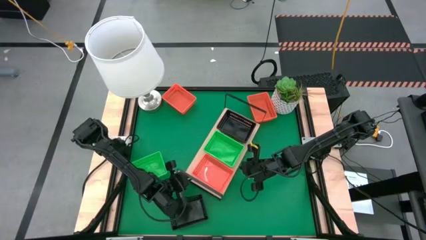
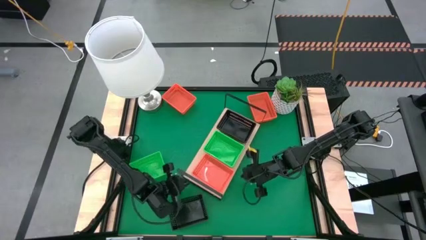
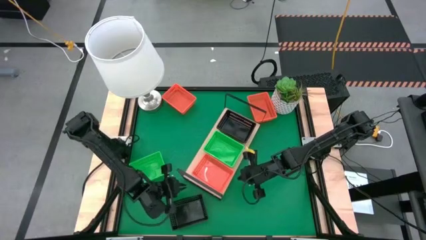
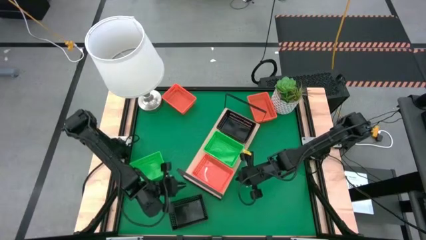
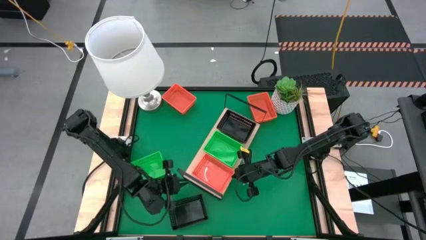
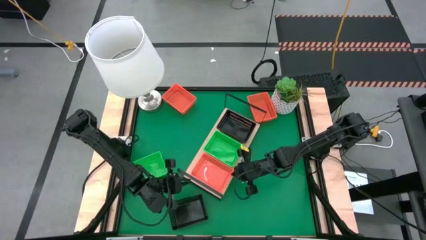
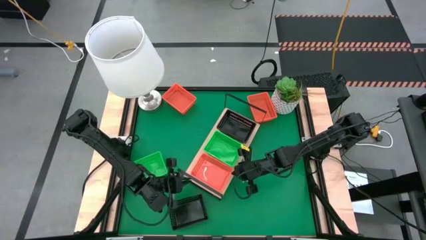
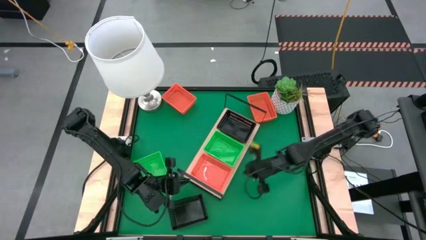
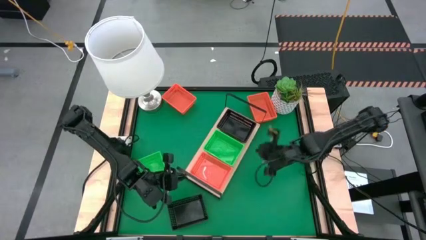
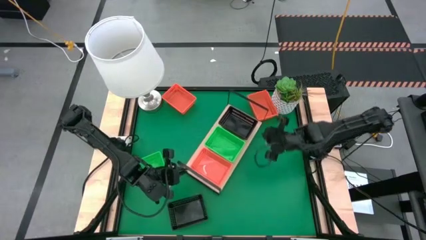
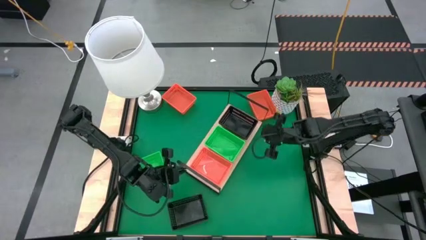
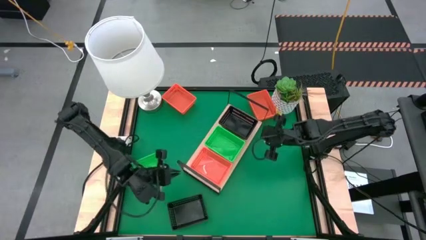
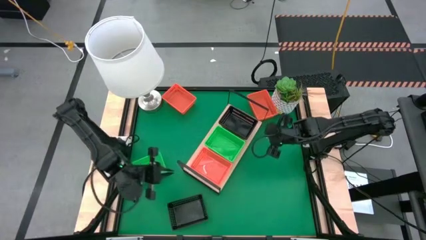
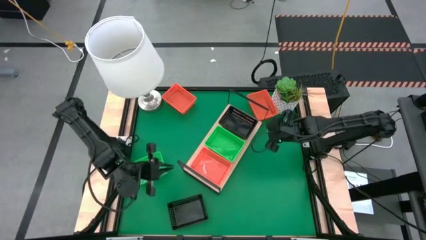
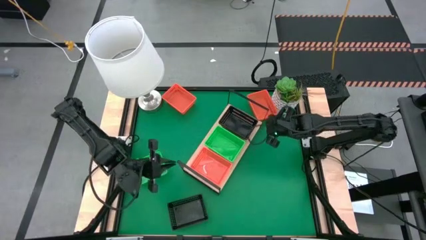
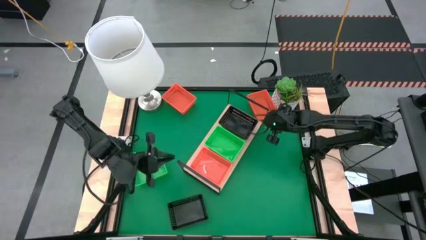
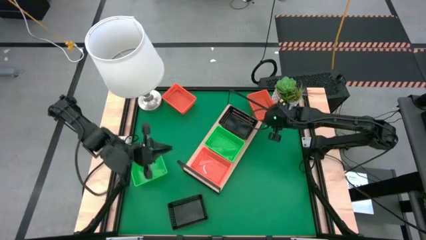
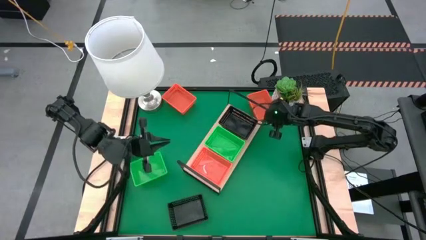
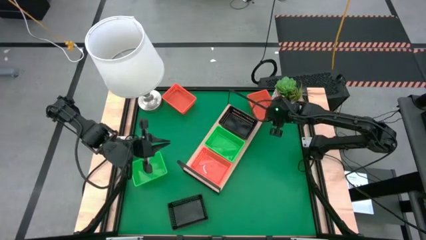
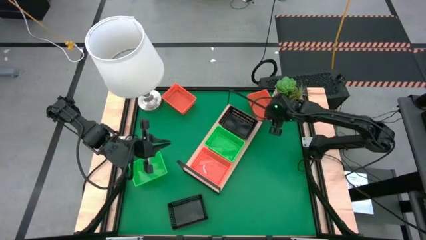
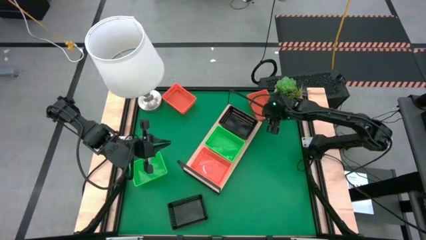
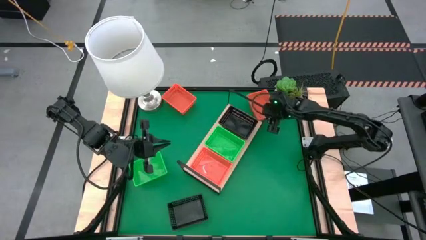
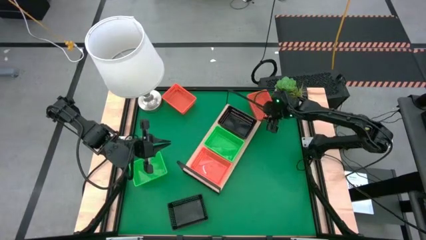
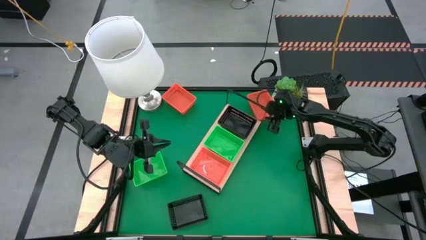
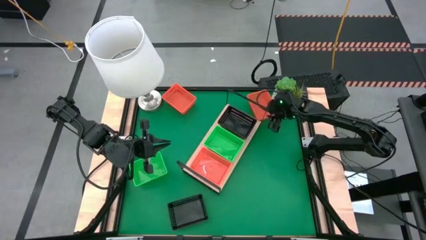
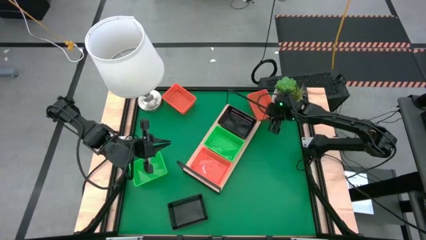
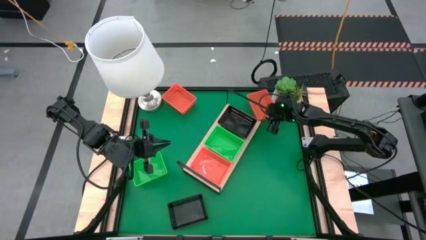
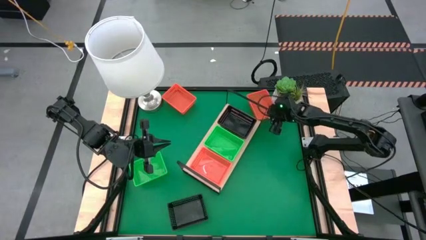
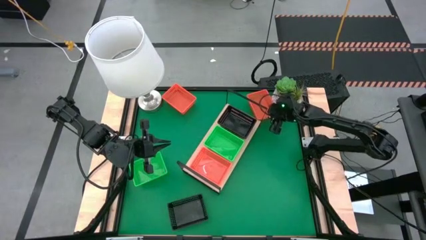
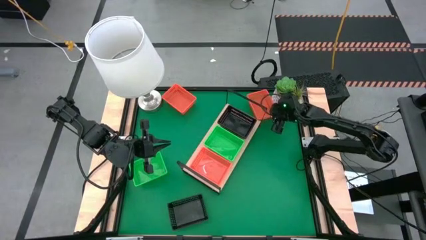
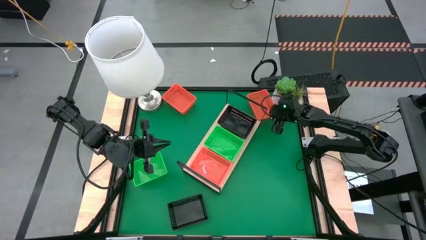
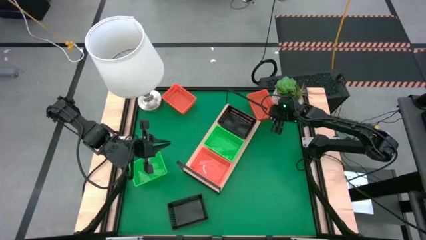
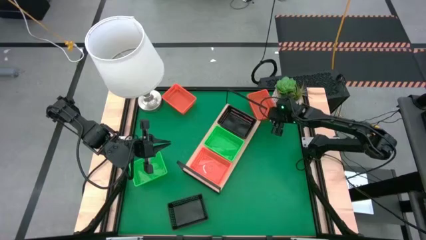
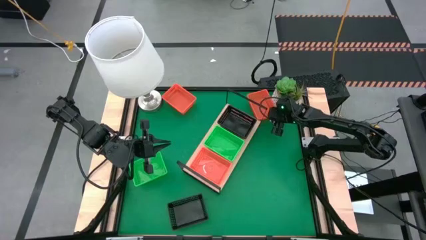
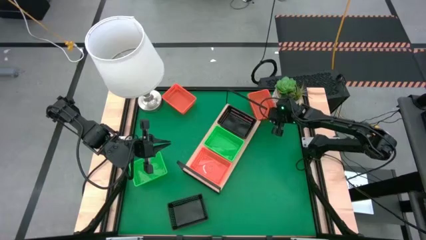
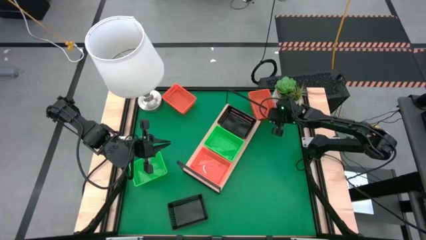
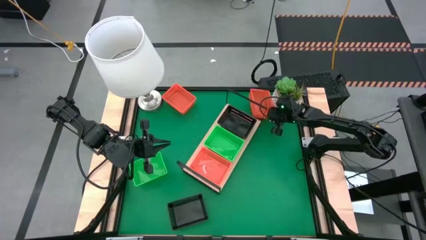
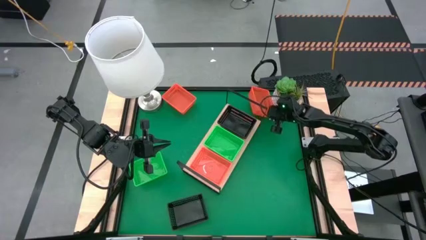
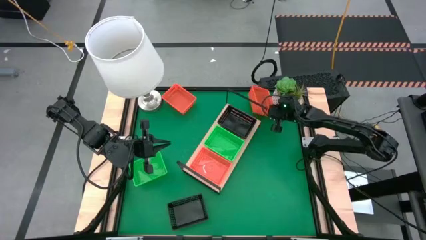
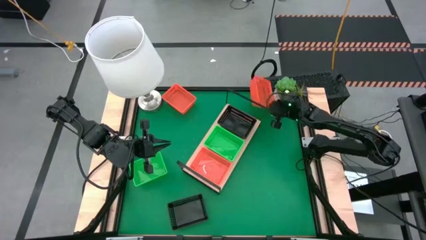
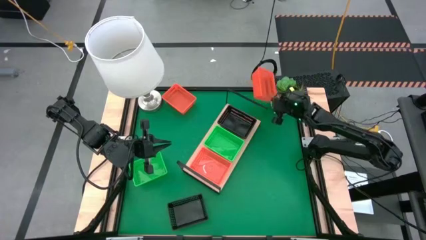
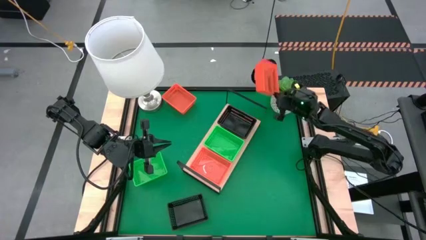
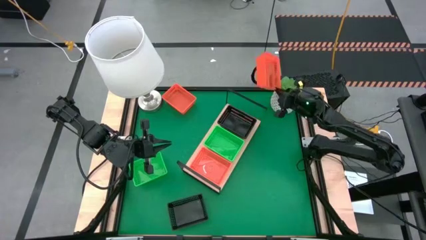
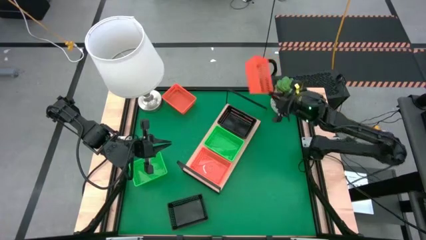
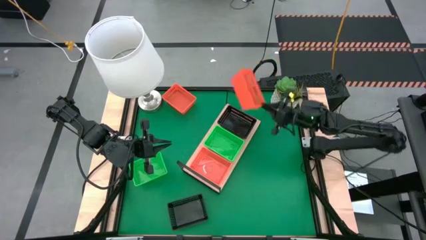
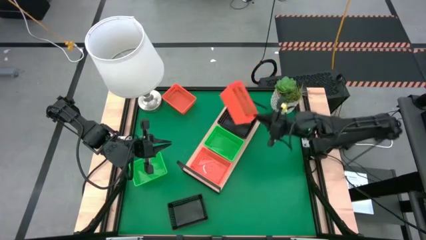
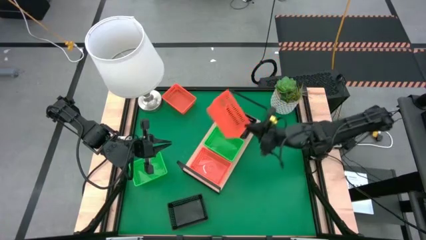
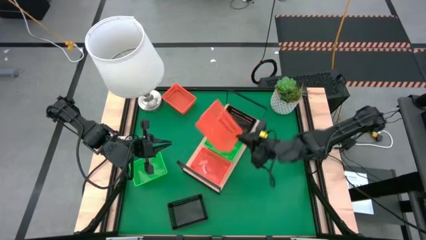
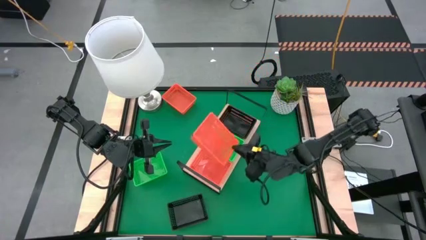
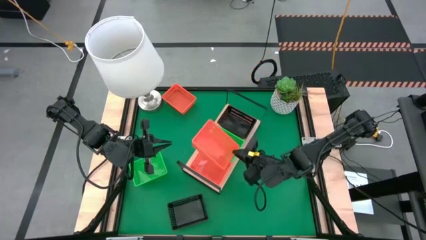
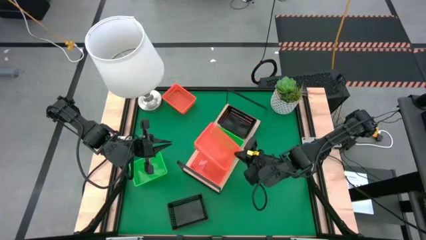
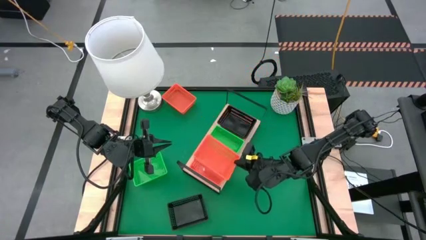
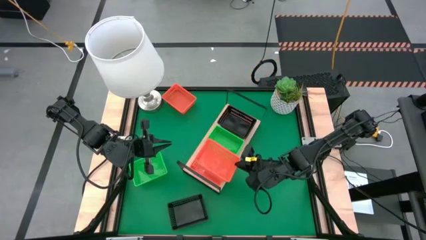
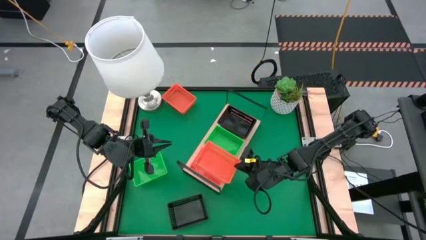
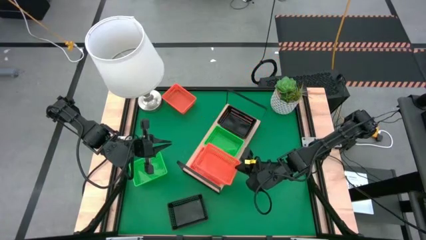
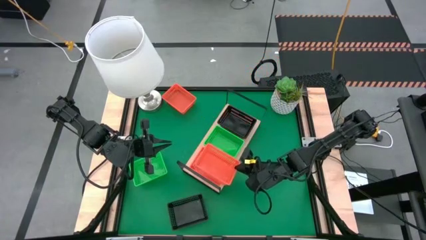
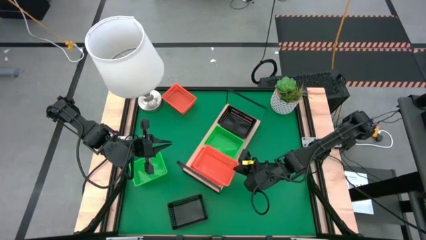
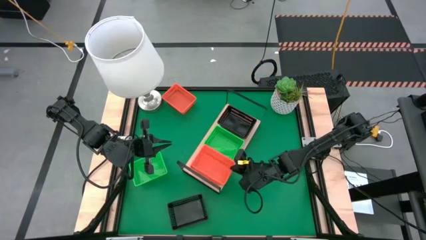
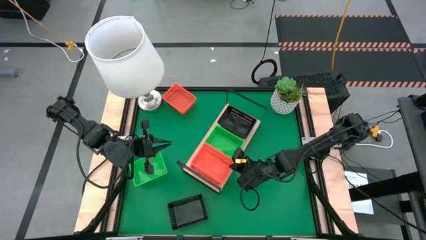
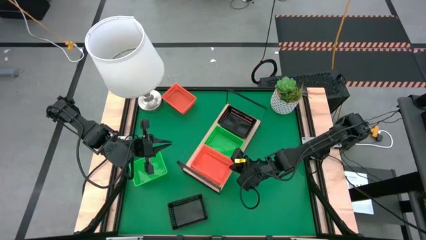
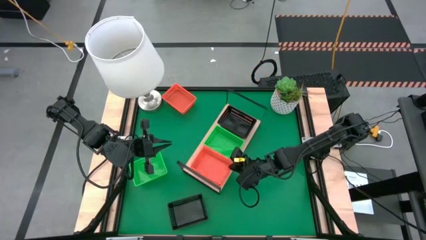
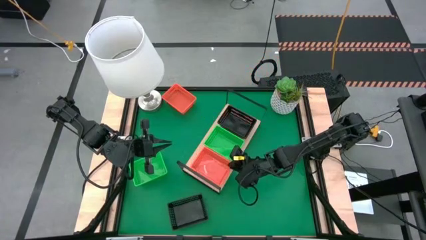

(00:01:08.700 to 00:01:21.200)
Task: Stack baskets on shelf by color
Stack the right orange bin into the orange bin on the shelf

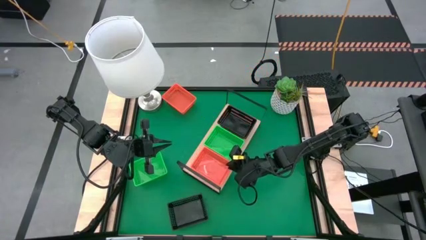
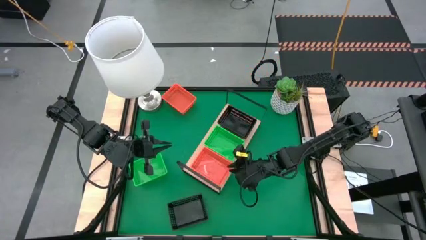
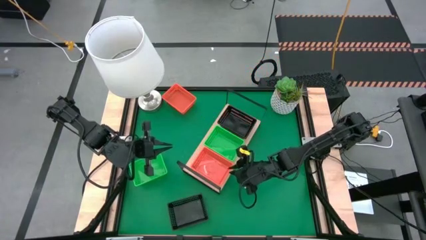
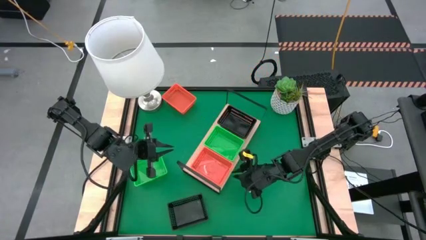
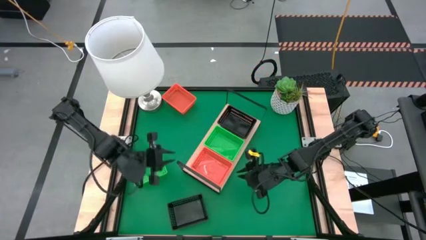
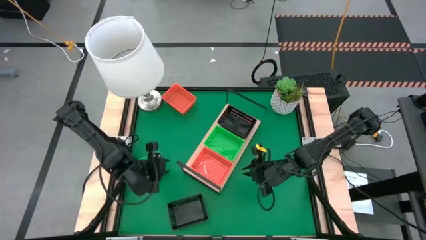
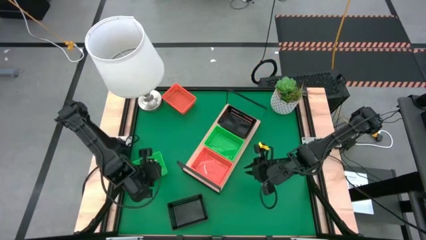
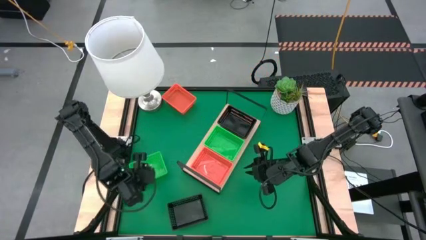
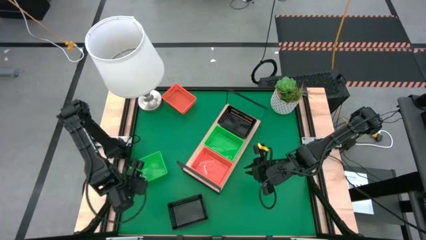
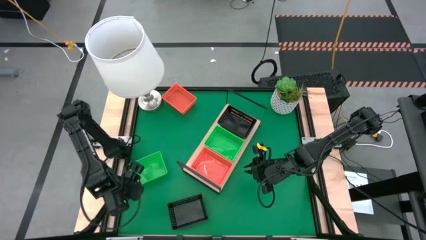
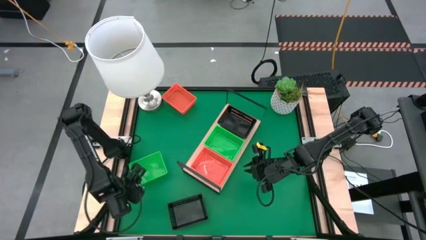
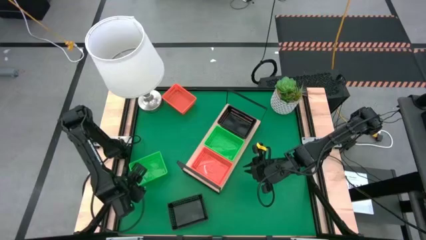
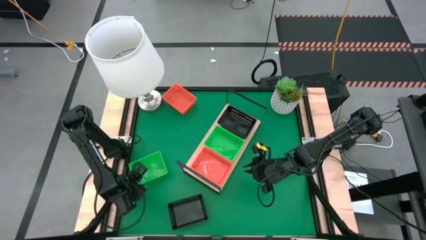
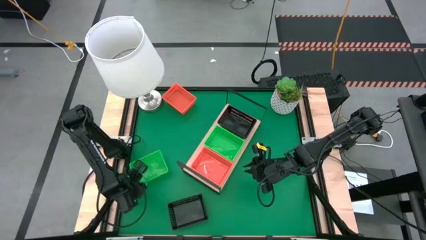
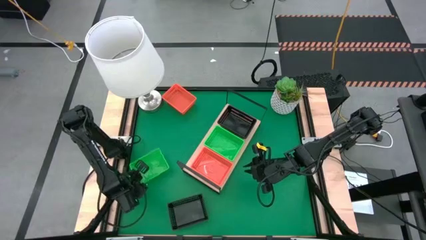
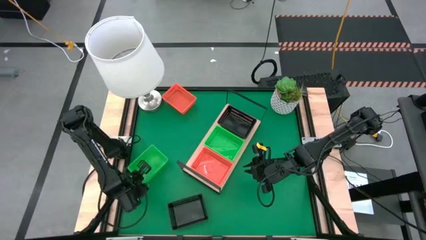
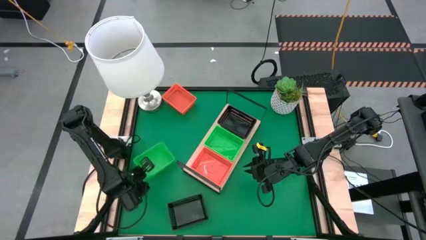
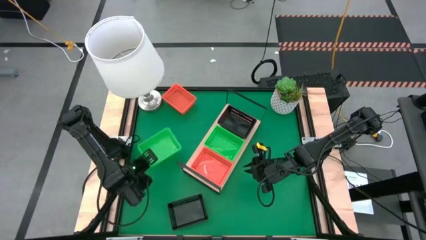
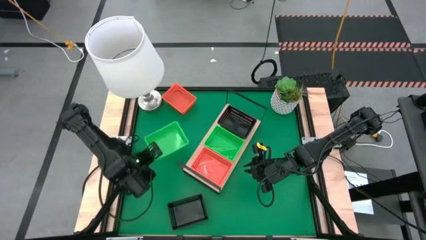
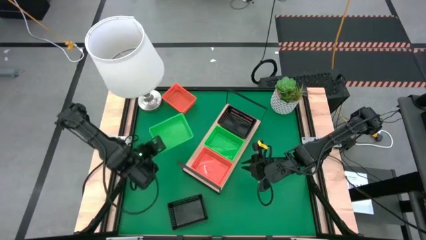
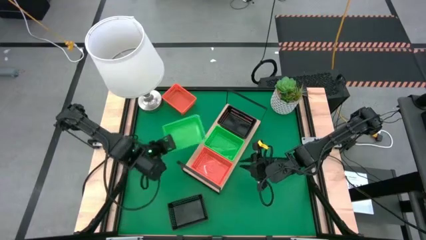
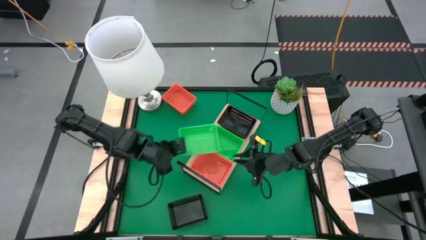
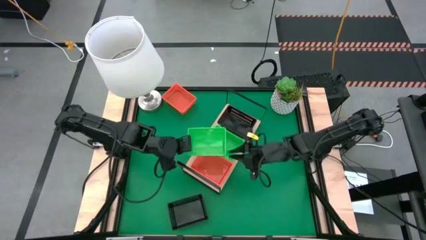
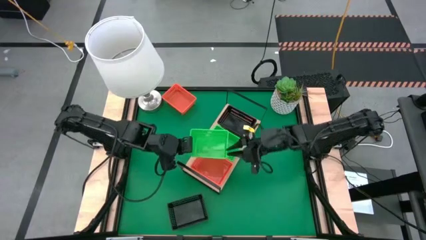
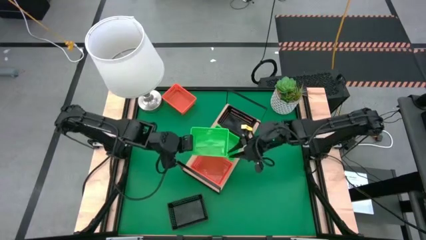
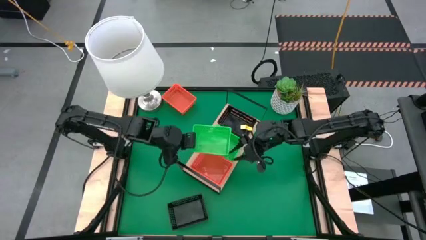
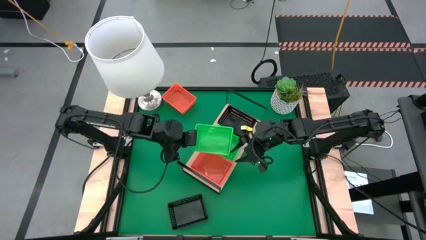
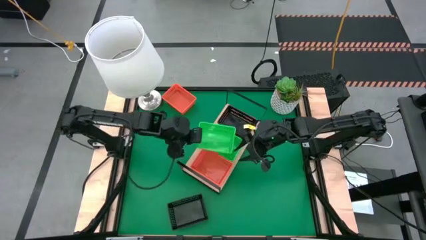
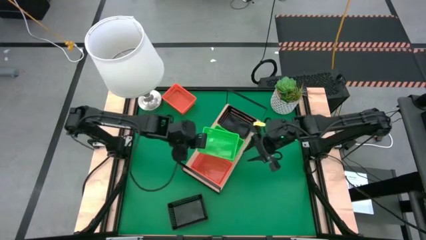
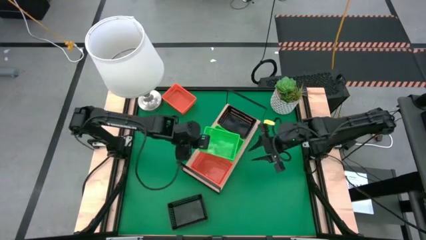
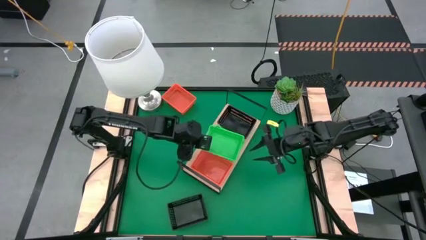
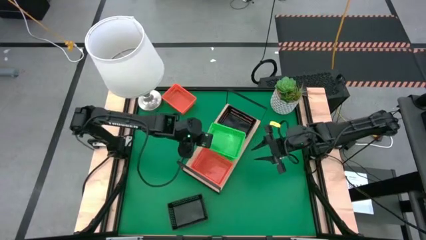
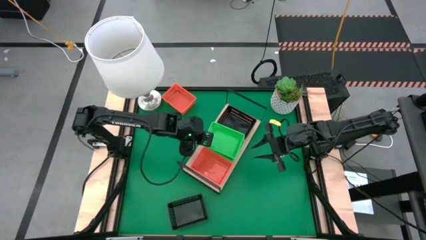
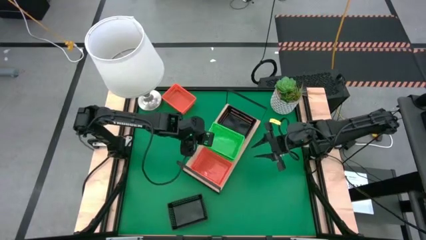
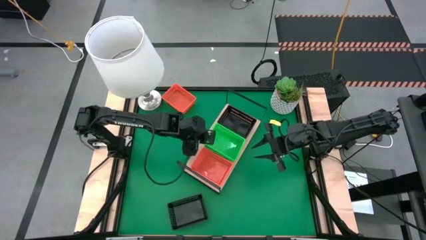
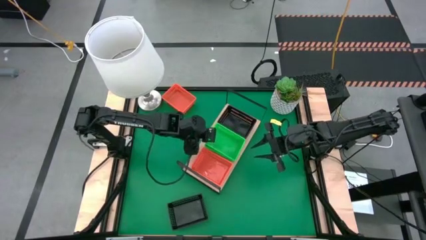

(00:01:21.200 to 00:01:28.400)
Stack the green bin into the stacked green bin on the shelf
